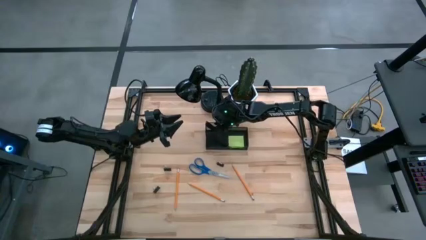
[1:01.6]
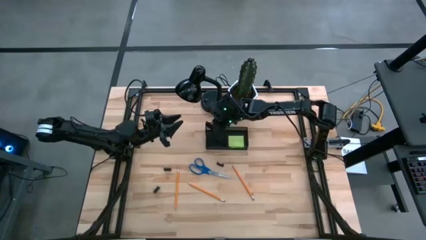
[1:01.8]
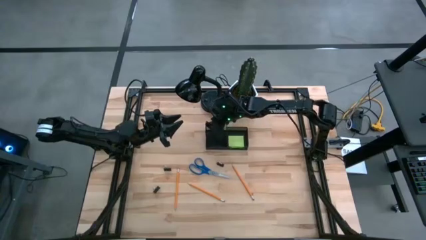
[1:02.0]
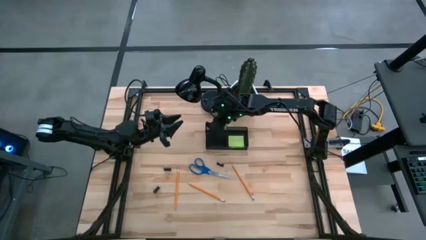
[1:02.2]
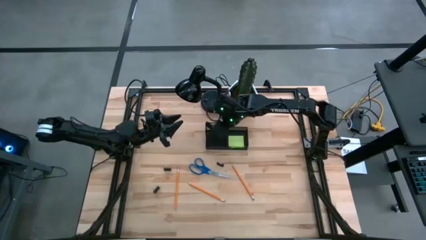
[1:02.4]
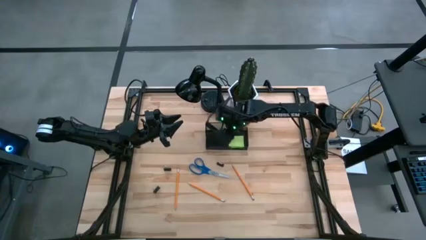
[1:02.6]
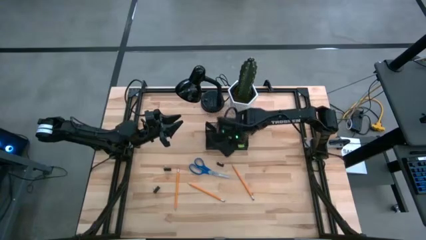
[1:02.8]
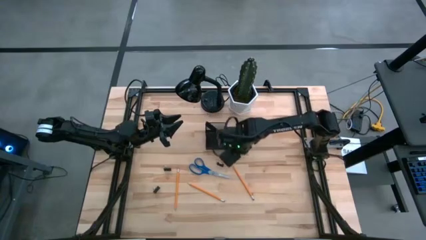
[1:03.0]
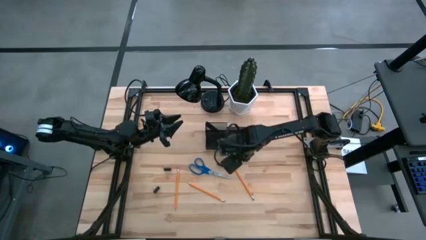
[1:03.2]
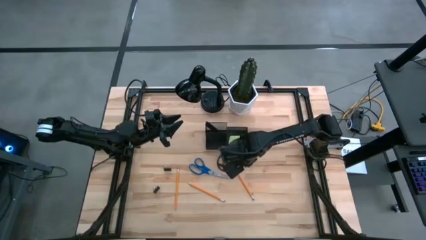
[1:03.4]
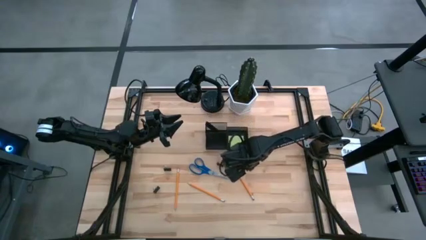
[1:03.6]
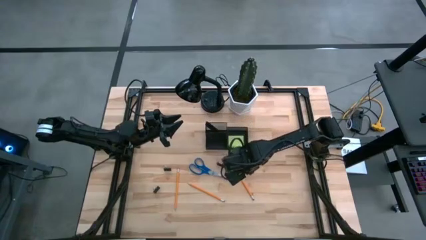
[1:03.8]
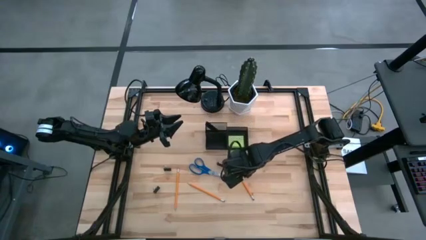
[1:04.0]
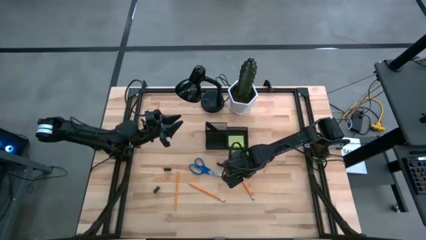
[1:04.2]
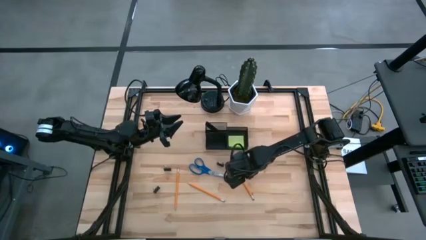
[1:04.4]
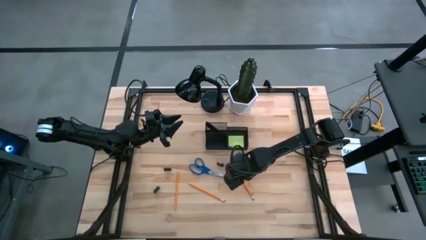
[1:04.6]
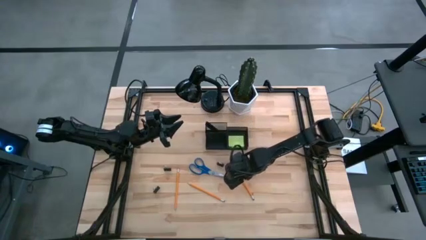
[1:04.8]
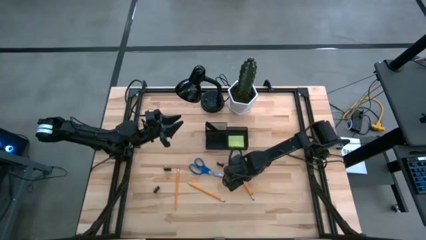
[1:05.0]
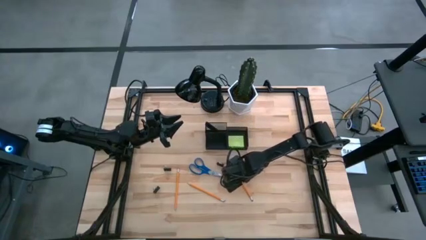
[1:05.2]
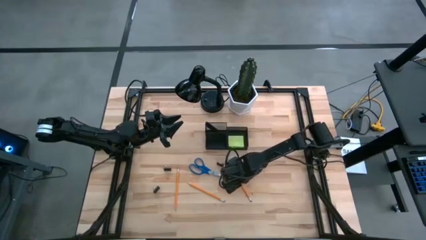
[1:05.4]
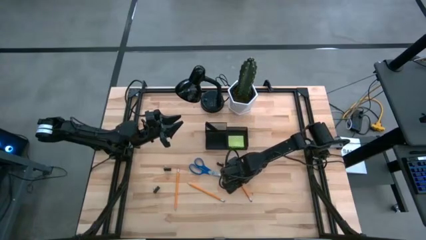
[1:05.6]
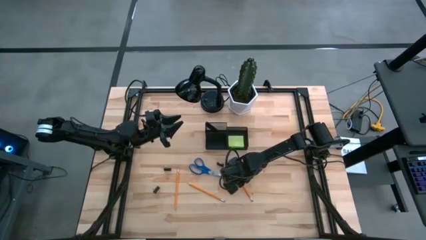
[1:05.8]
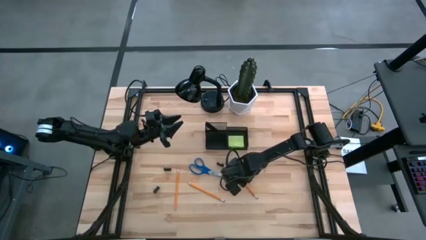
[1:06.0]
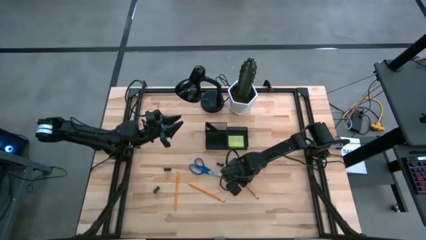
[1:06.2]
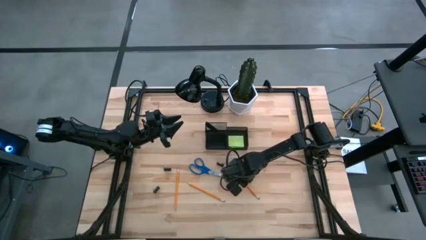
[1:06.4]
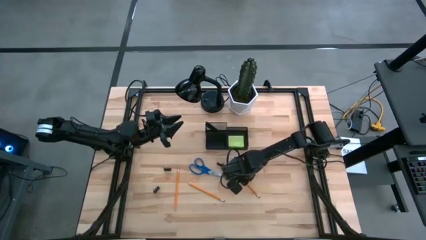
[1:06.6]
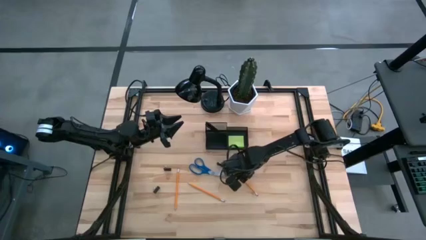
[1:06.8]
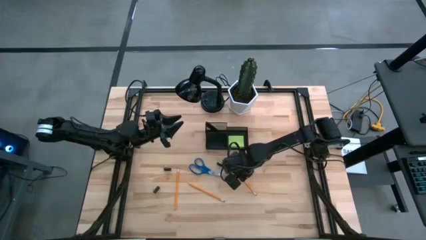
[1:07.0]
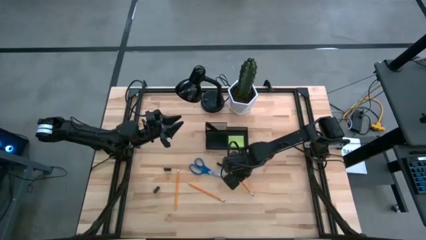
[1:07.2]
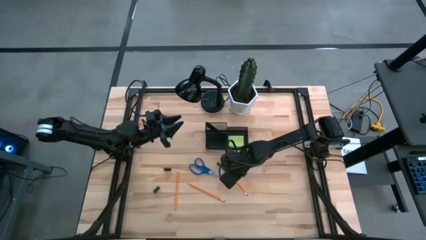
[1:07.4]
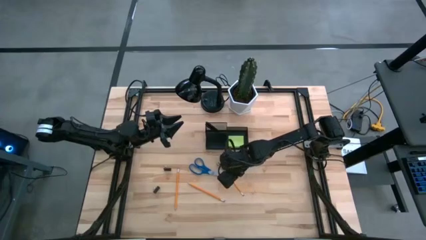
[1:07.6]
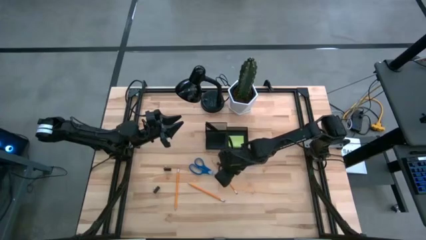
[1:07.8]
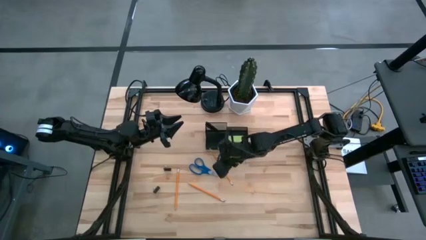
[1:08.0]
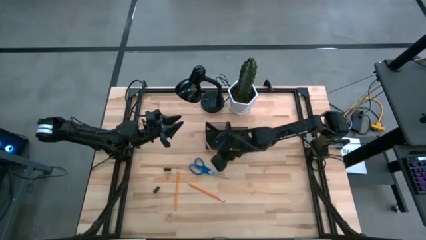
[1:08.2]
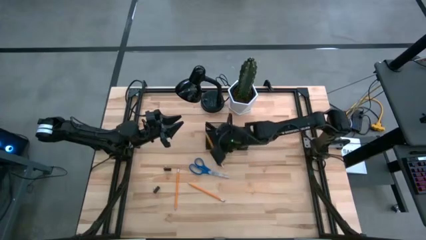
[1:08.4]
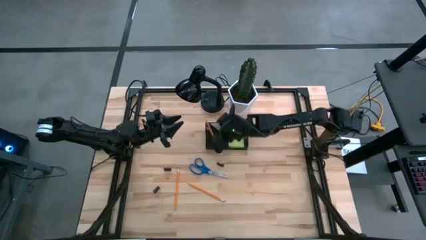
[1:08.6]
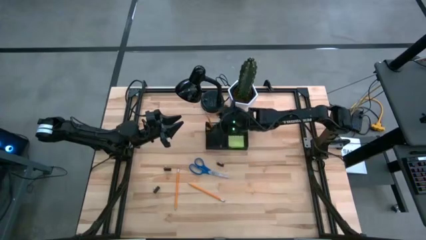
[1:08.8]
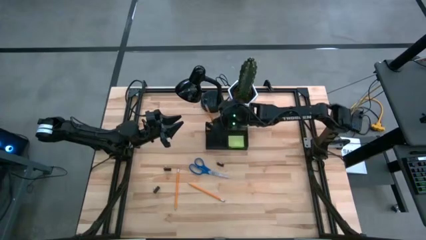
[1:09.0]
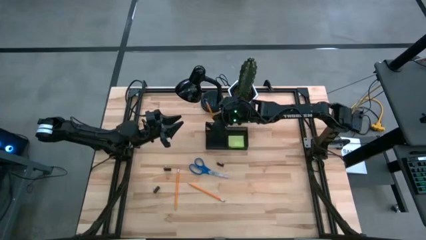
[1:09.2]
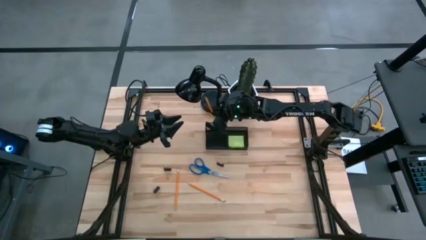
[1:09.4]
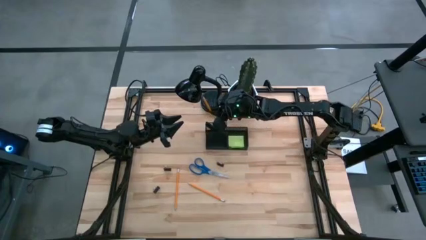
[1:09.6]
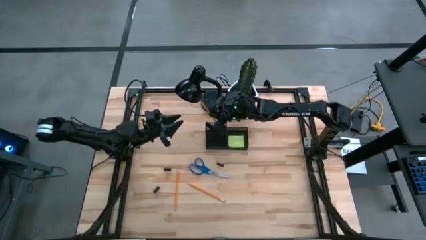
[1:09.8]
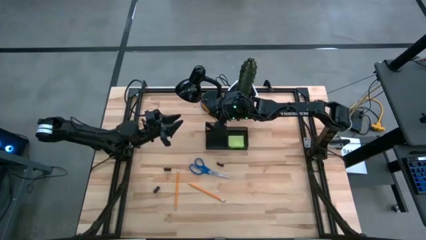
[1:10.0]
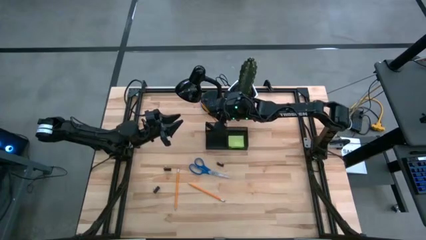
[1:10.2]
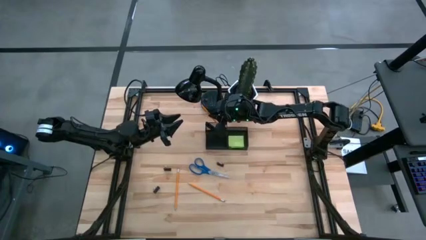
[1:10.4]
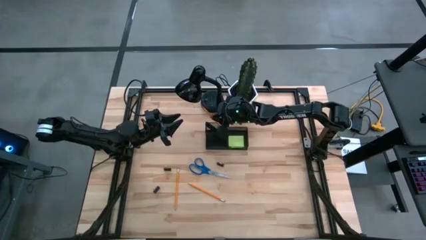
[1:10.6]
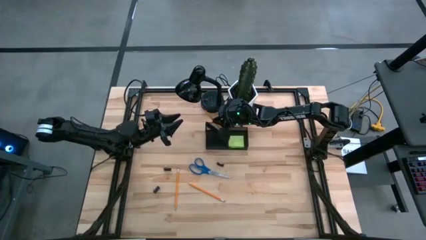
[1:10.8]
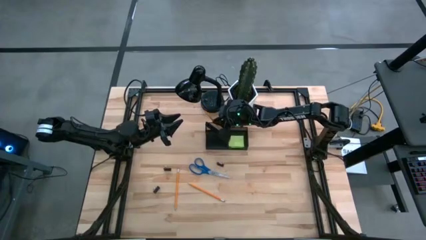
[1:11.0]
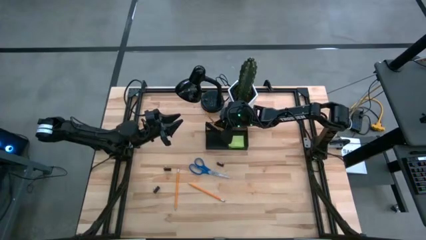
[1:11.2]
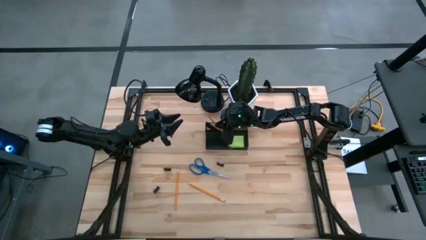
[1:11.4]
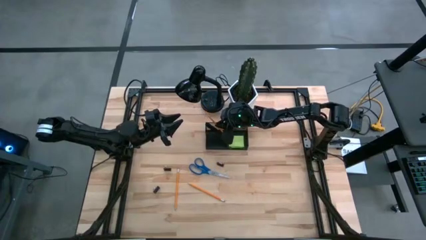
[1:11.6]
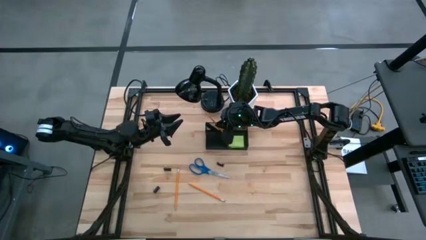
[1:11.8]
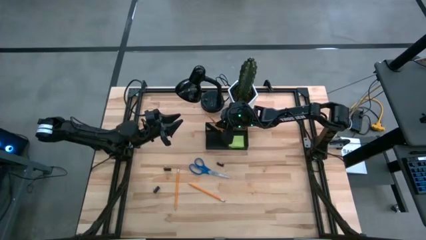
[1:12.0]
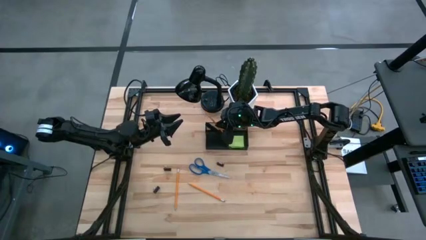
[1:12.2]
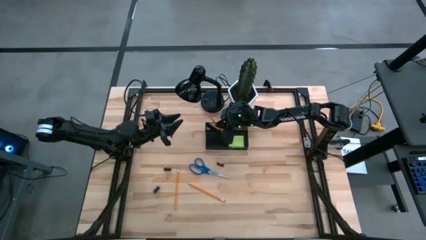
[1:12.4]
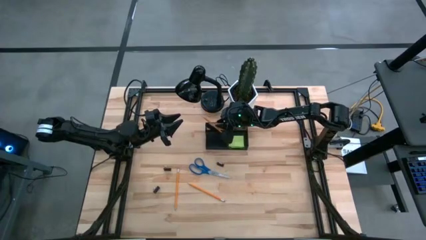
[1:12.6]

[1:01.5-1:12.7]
Task: Pick and place office supplies into organizer
Put the right yellow pencil into the mesh desk organizer
